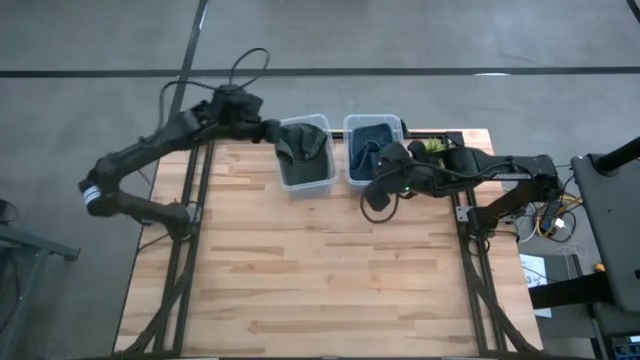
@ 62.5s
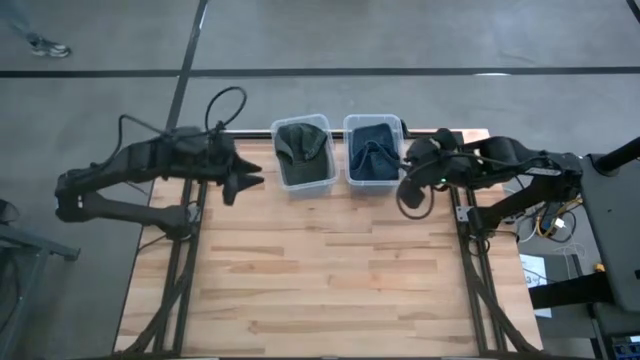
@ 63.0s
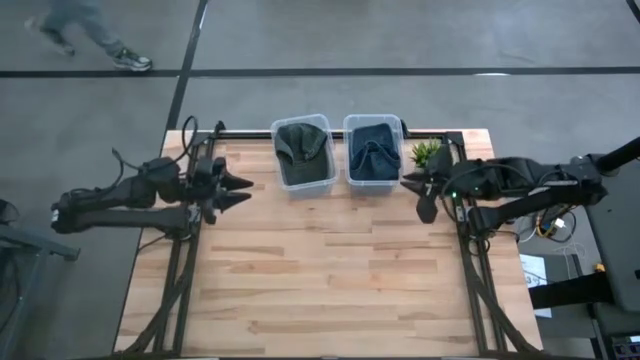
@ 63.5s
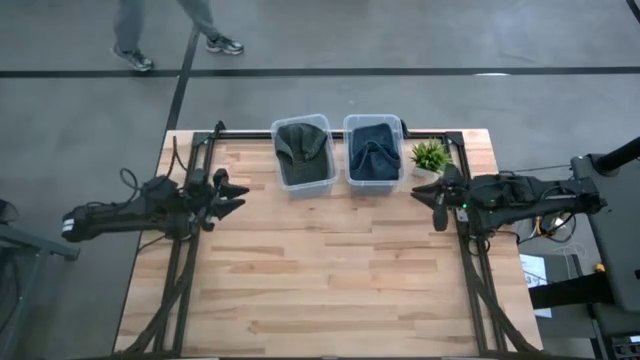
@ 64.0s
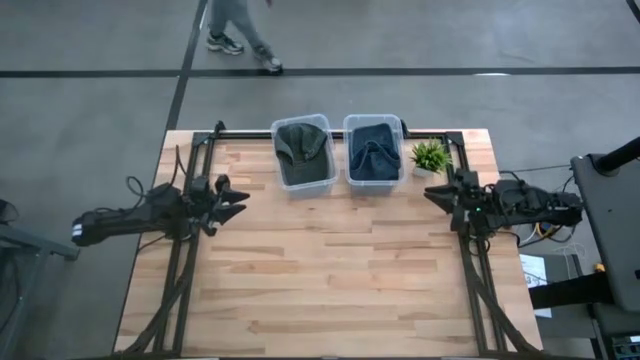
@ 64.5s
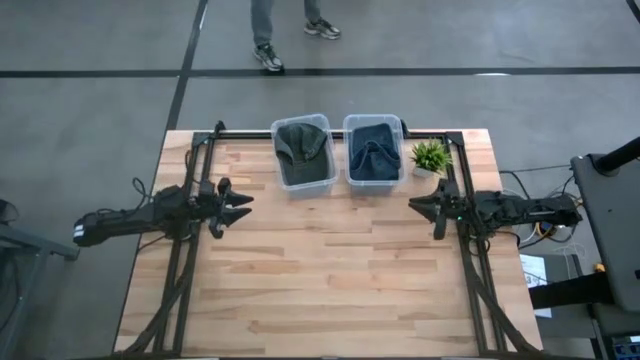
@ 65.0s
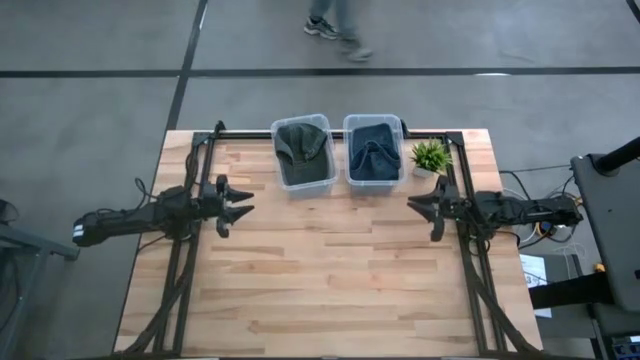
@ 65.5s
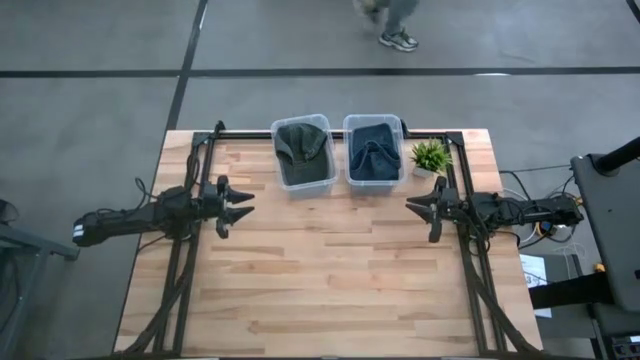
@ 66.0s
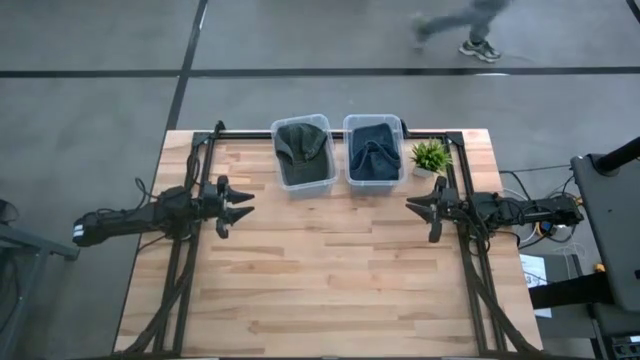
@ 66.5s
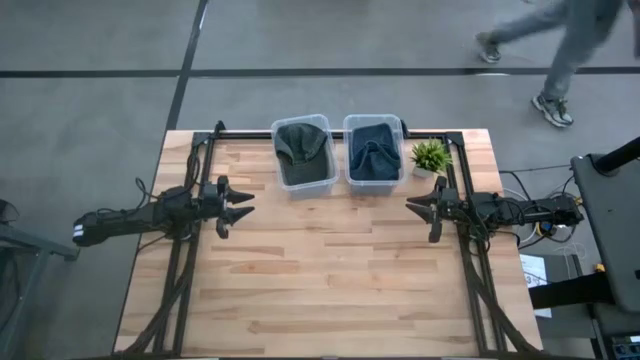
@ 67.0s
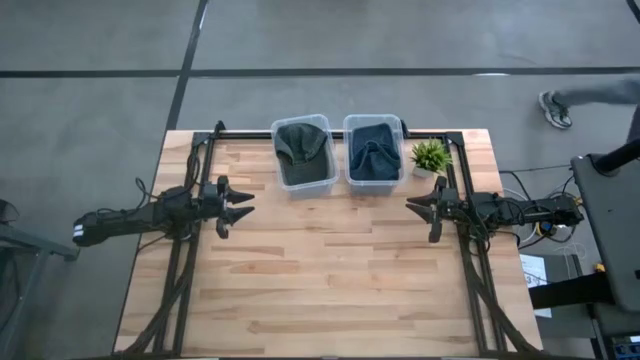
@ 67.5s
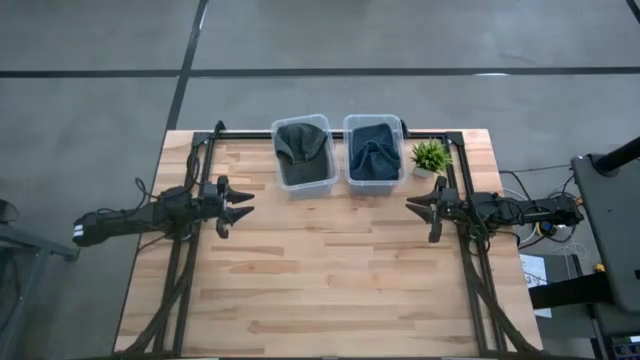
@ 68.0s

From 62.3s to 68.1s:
Task: Pick & Place hat
Return to Home Position

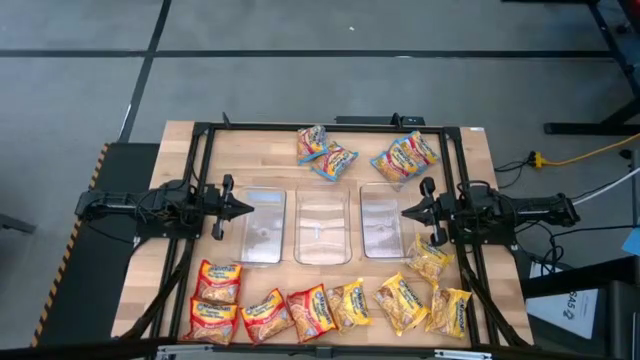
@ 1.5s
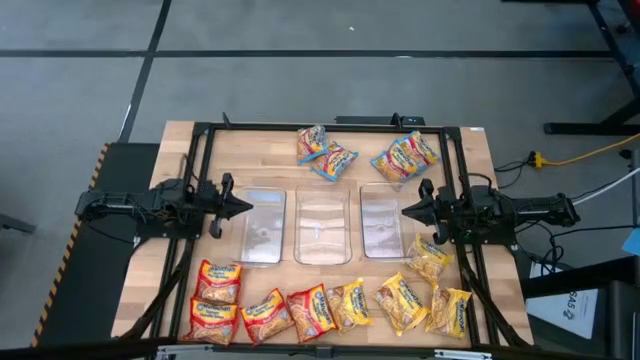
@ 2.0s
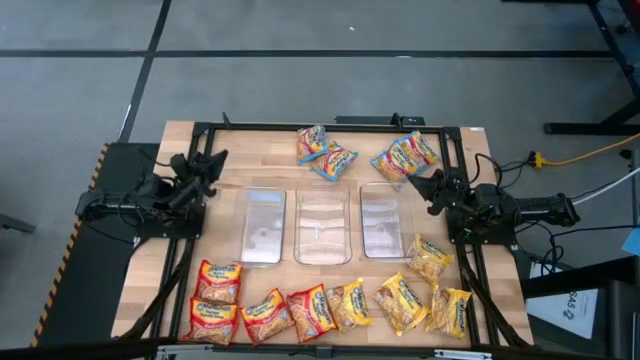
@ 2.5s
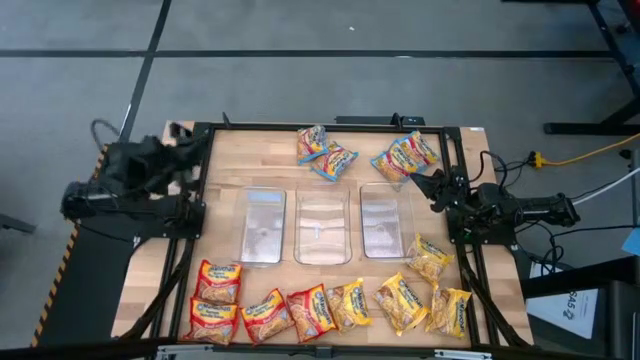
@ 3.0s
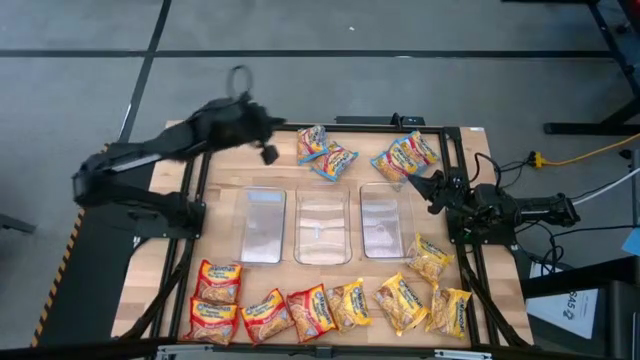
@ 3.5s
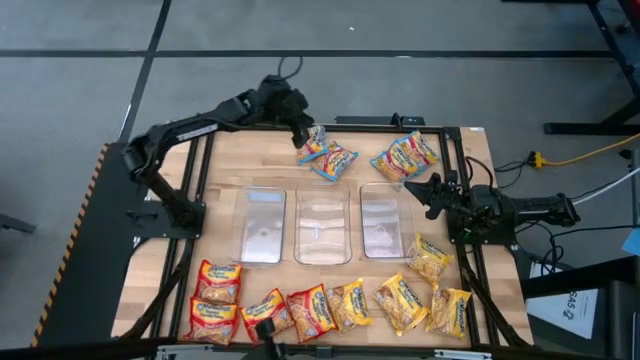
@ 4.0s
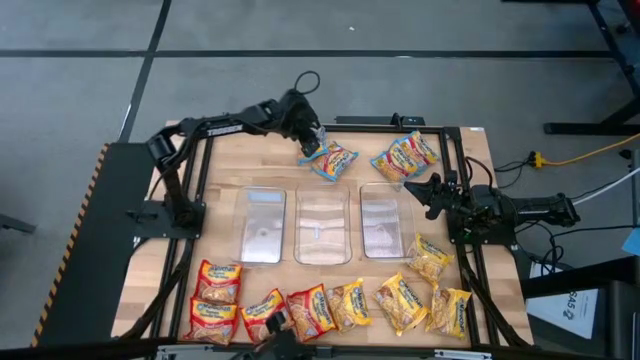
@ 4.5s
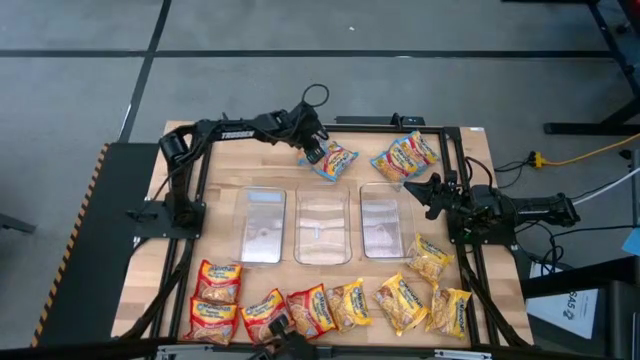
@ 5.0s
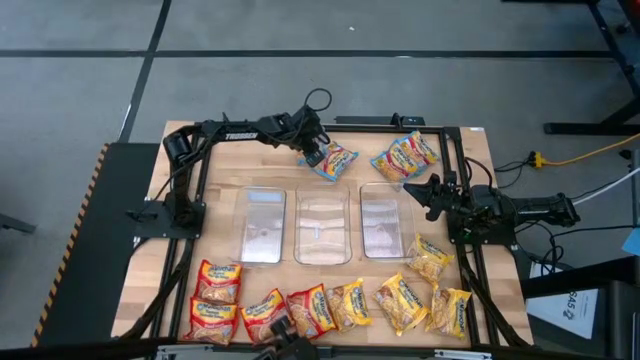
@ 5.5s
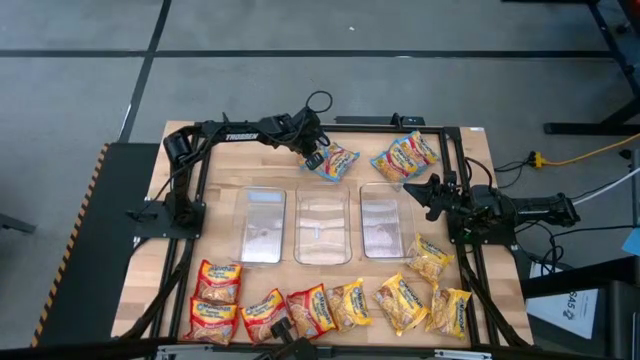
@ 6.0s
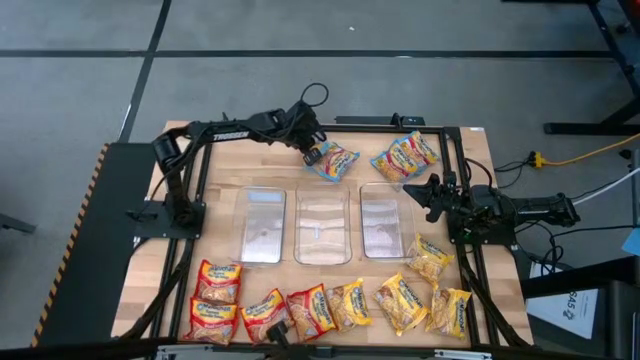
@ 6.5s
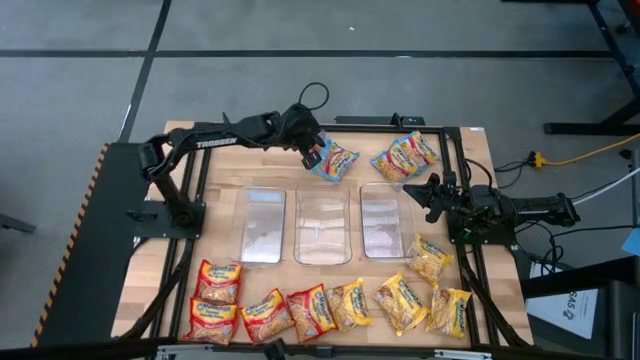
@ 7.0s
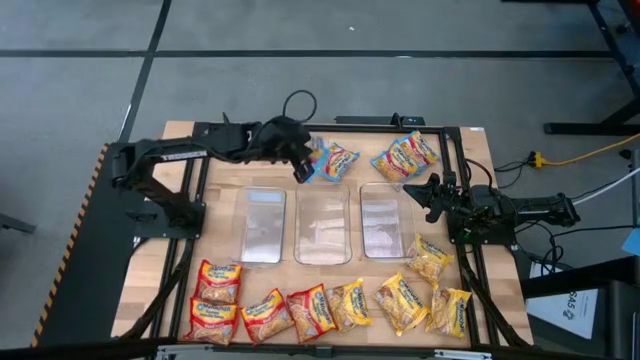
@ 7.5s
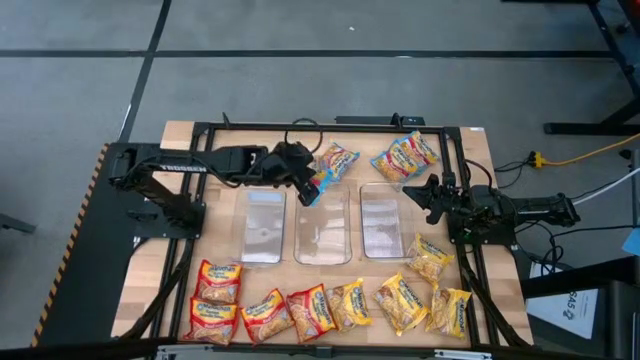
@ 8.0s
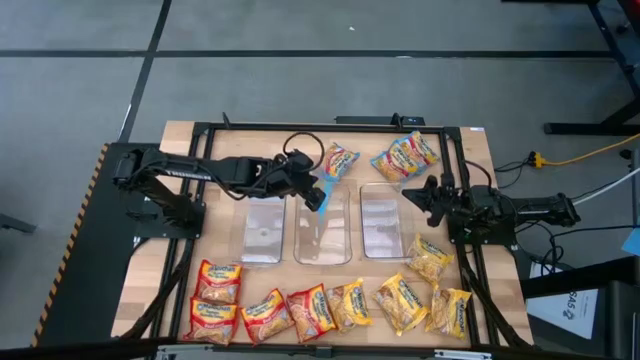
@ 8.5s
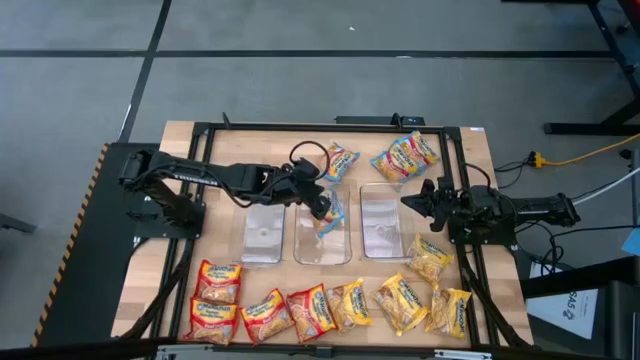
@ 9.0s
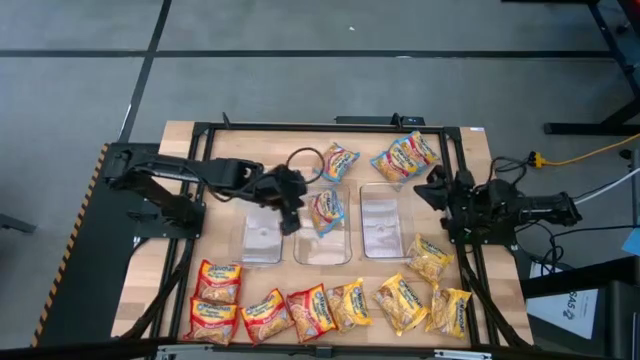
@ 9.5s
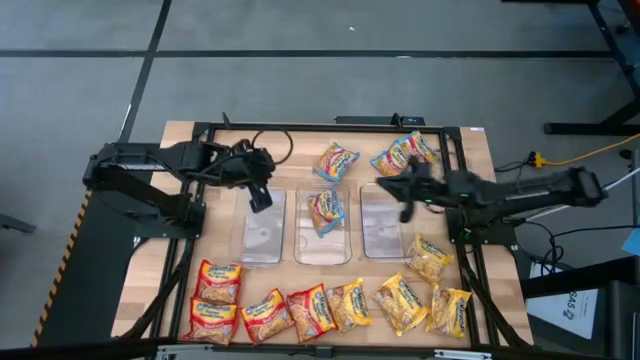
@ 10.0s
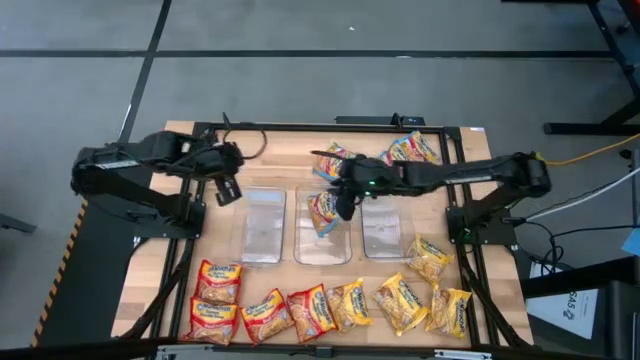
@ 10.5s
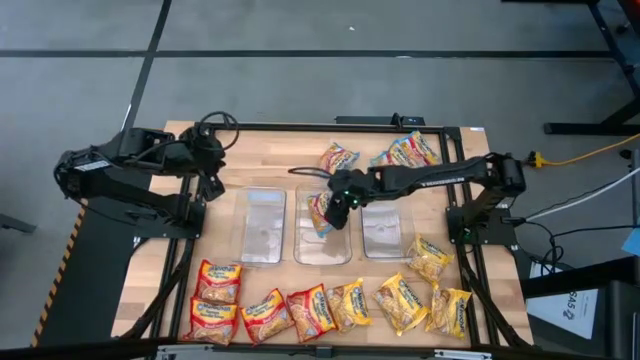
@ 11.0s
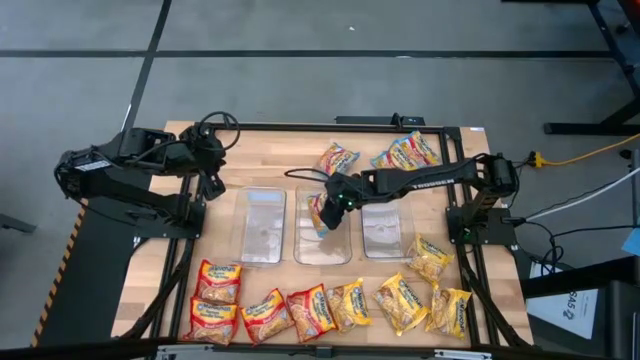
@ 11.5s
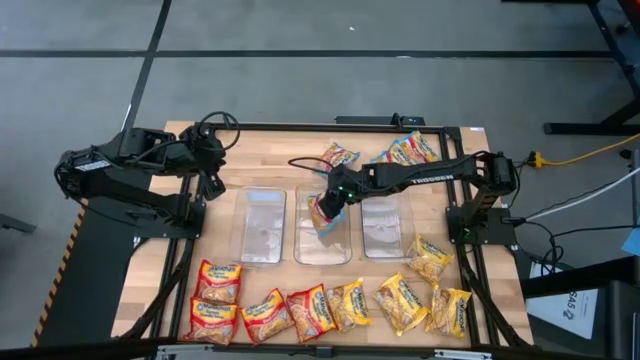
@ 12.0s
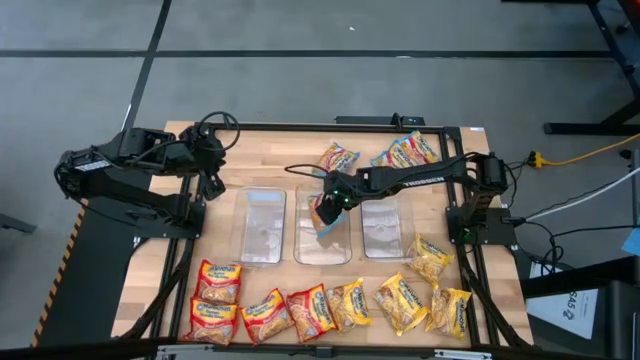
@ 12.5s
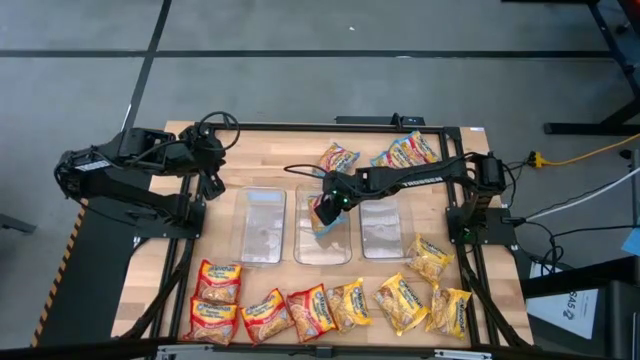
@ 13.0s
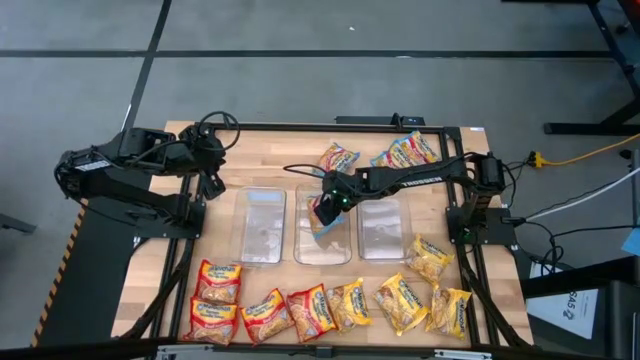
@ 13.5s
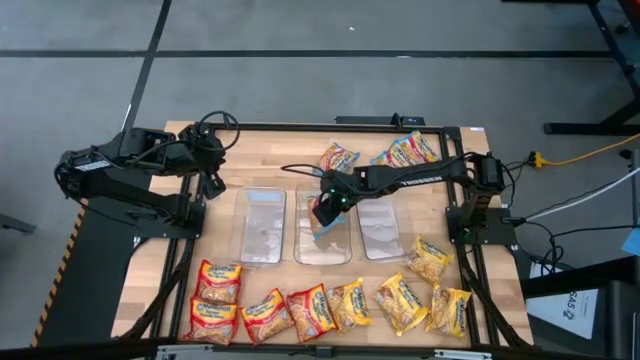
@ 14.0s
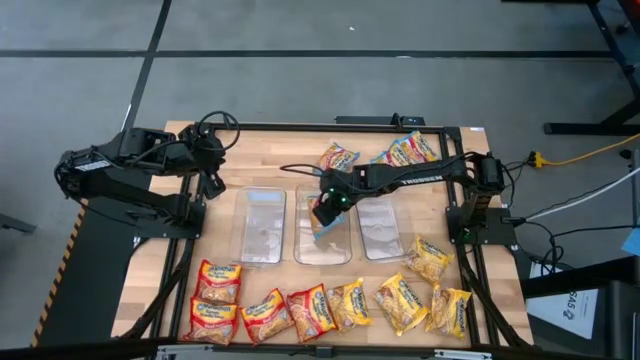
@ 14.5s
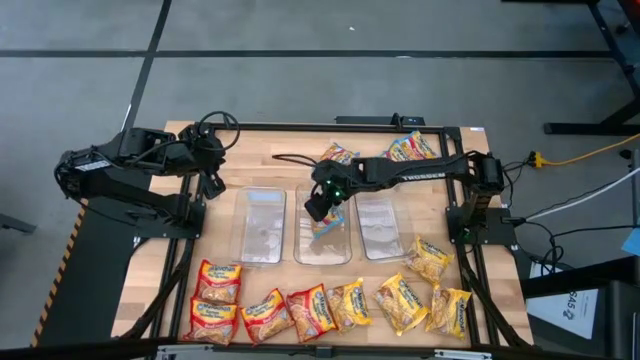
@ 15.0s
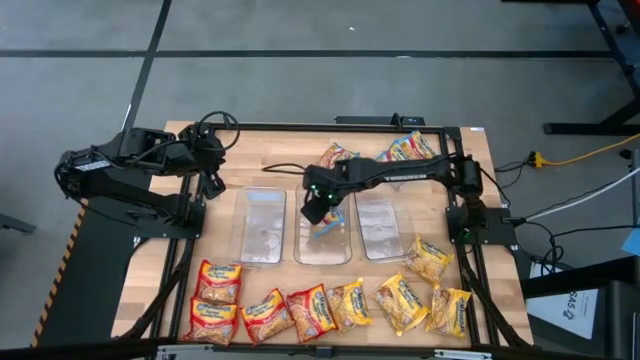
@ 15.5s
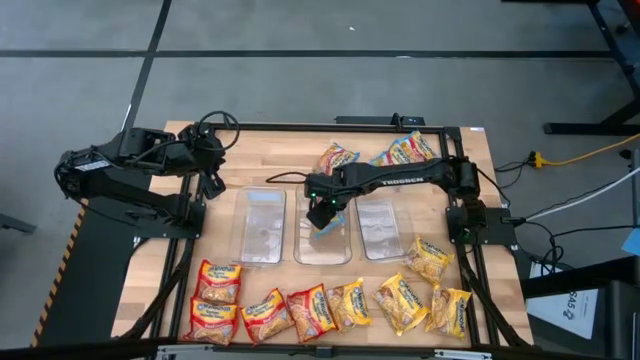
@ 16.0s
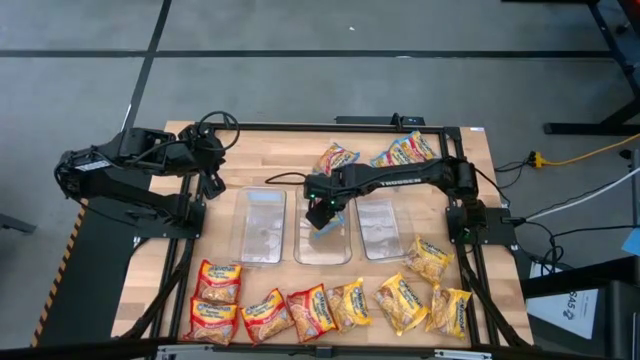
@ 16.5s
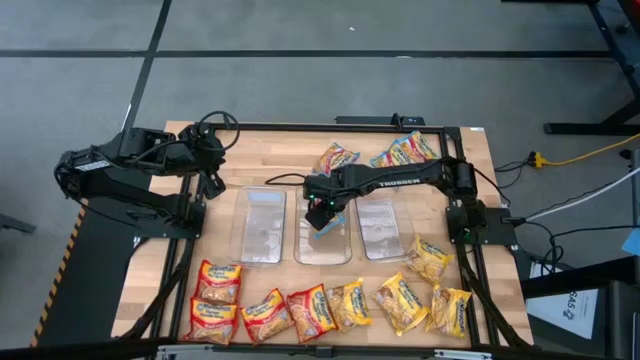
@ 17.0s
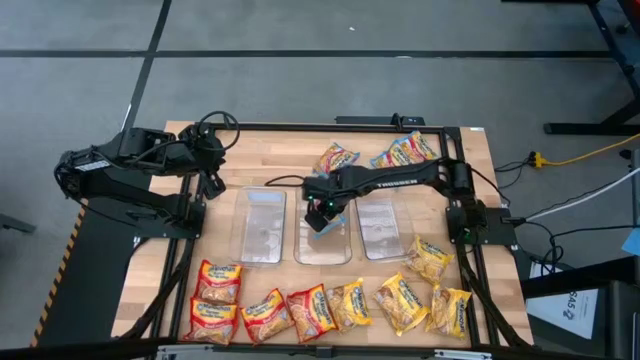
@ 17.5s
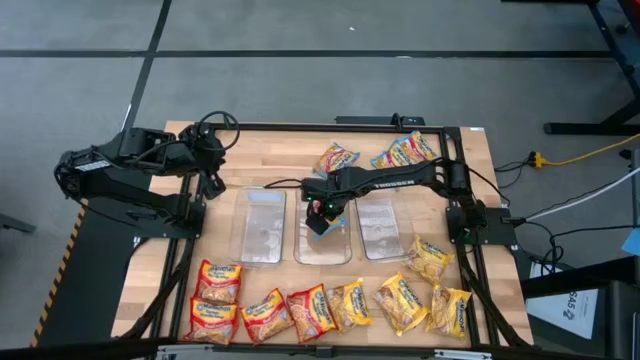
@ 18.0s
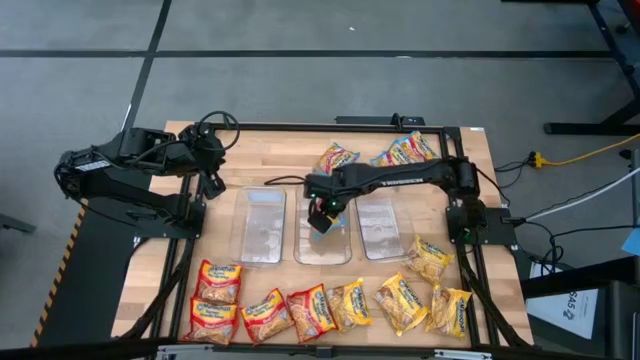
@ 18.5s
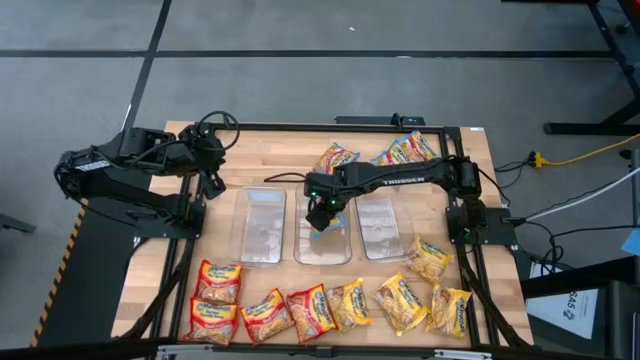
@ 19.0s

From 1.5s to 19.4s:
Task: Sort Maruchan noodles
Put the blue noodle pack into the middle transparent bin
